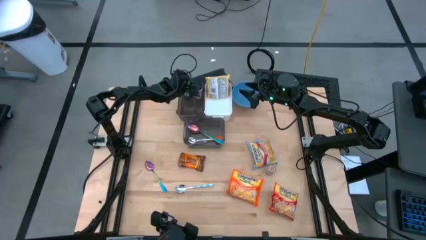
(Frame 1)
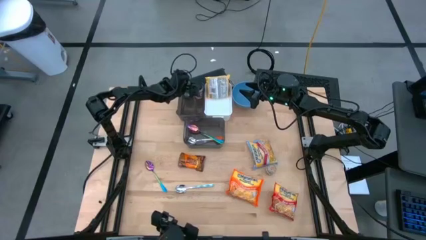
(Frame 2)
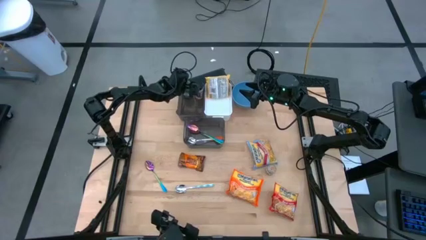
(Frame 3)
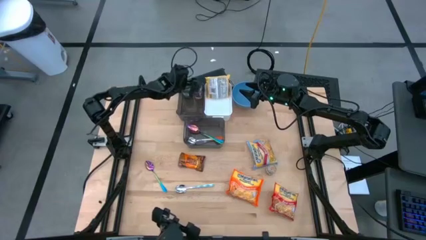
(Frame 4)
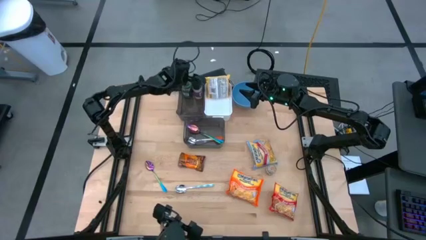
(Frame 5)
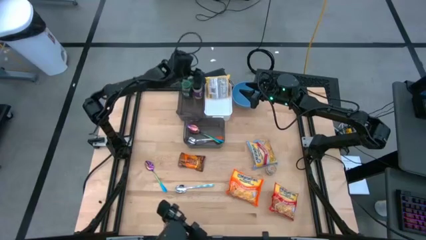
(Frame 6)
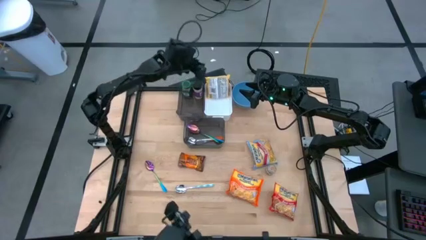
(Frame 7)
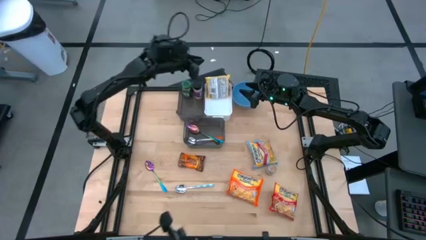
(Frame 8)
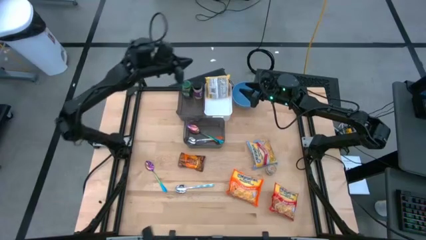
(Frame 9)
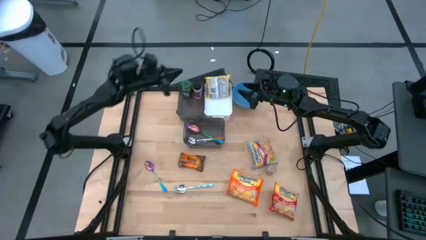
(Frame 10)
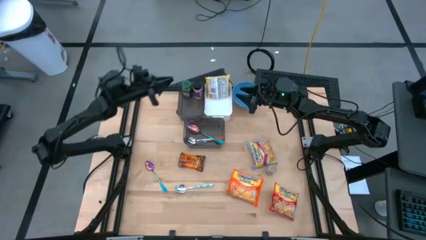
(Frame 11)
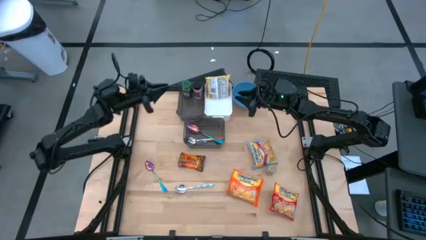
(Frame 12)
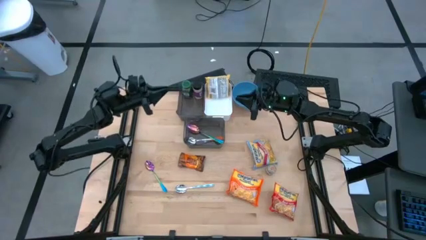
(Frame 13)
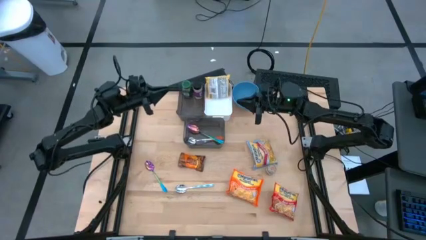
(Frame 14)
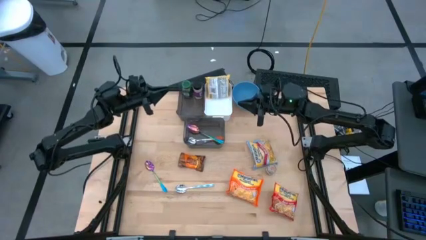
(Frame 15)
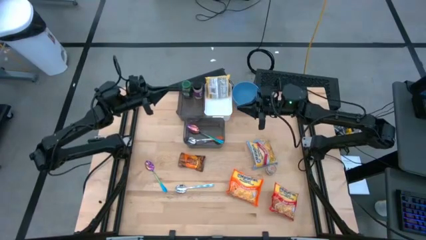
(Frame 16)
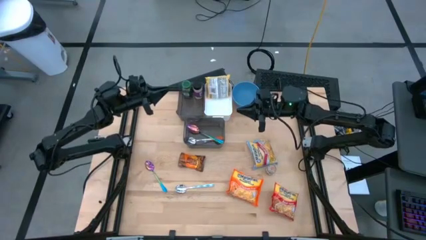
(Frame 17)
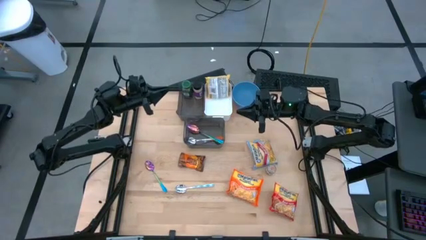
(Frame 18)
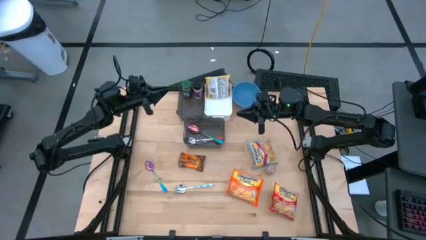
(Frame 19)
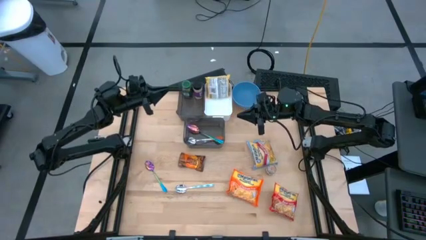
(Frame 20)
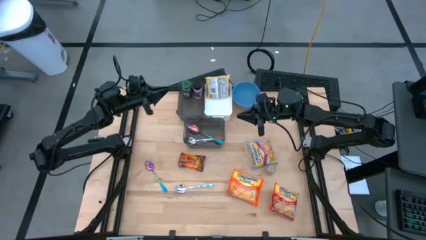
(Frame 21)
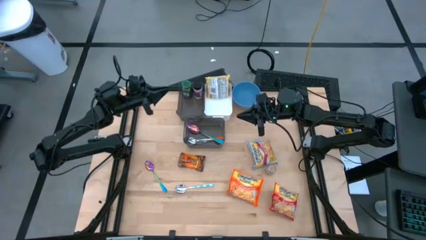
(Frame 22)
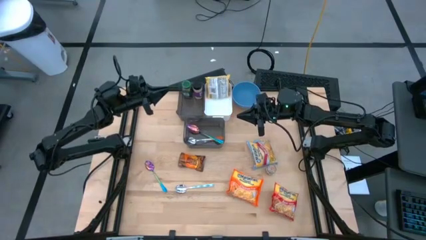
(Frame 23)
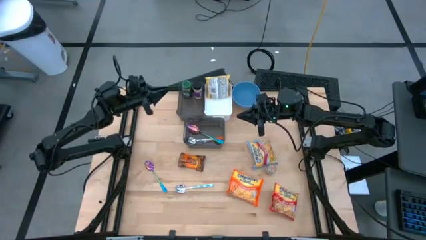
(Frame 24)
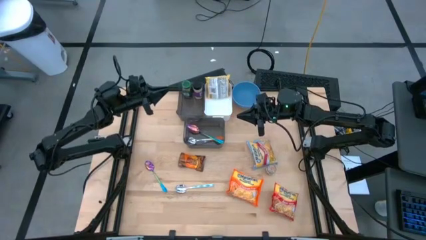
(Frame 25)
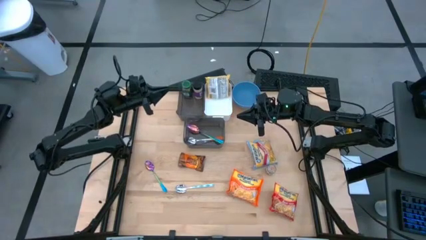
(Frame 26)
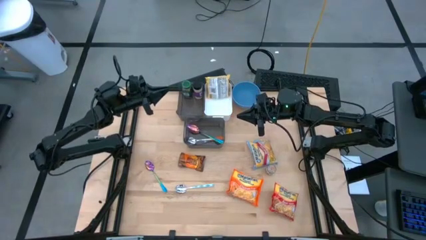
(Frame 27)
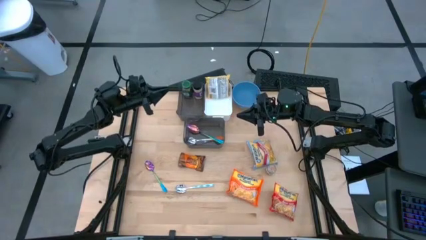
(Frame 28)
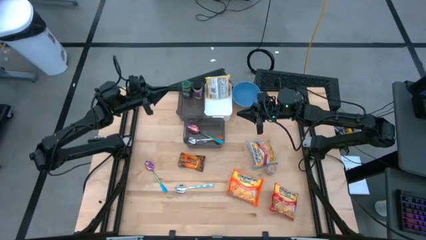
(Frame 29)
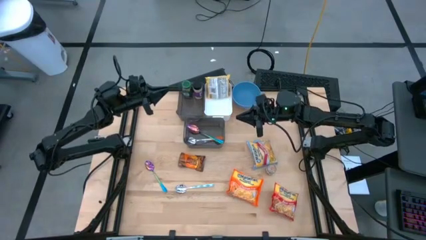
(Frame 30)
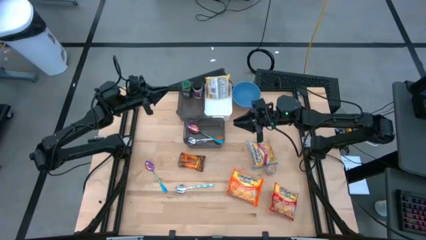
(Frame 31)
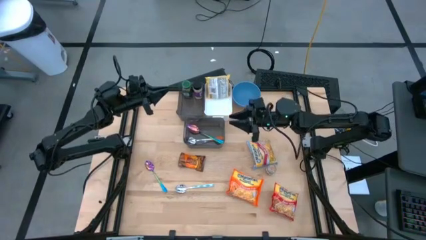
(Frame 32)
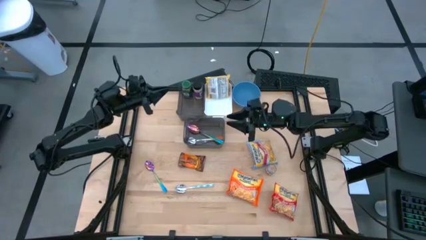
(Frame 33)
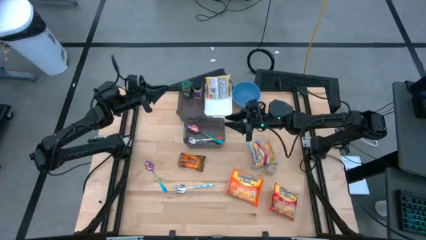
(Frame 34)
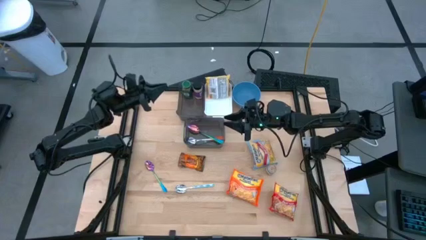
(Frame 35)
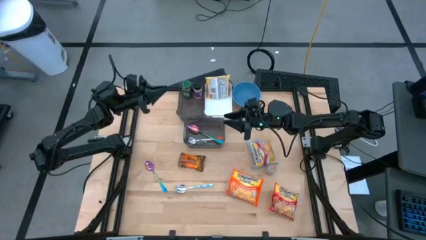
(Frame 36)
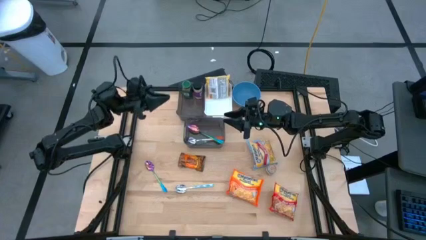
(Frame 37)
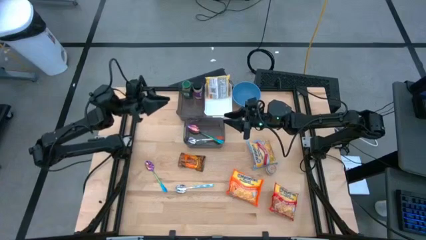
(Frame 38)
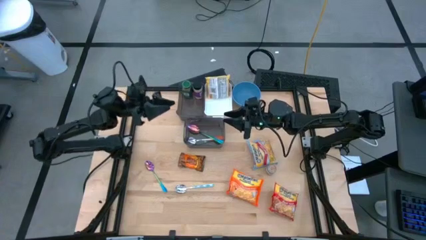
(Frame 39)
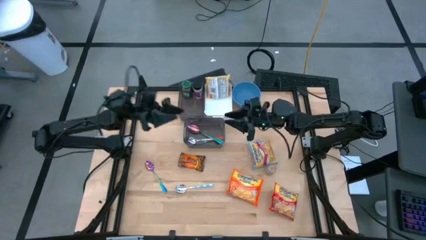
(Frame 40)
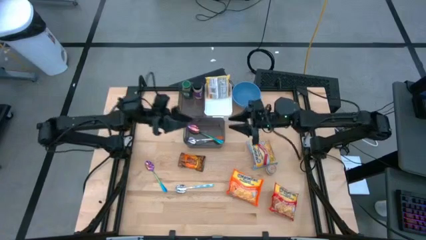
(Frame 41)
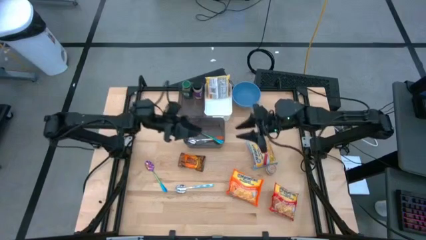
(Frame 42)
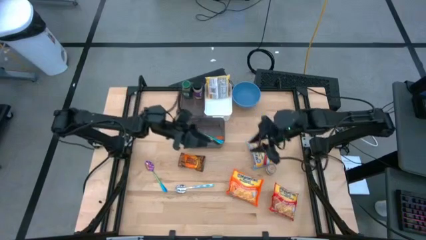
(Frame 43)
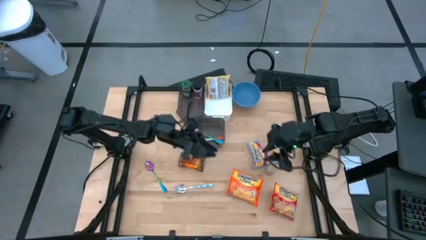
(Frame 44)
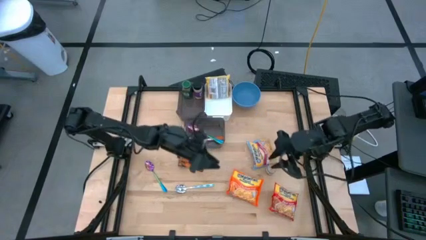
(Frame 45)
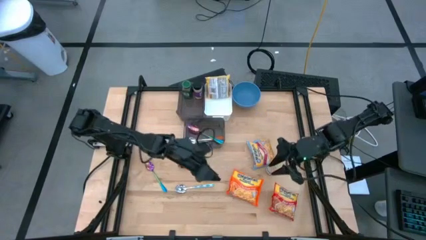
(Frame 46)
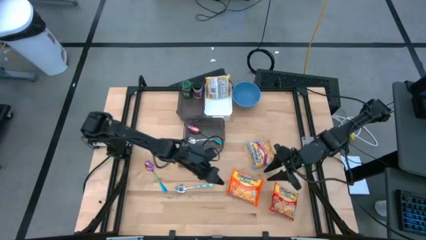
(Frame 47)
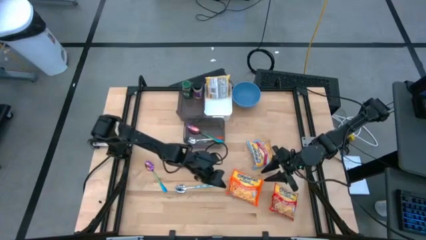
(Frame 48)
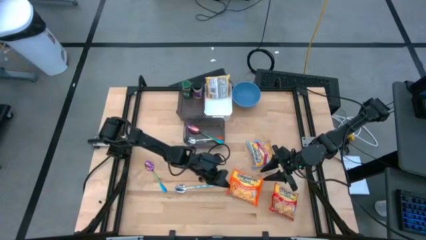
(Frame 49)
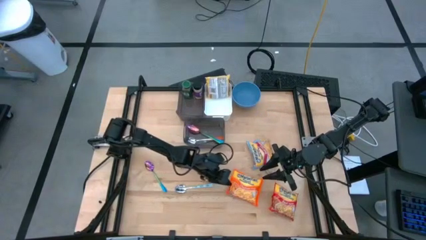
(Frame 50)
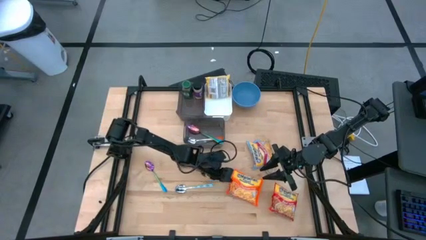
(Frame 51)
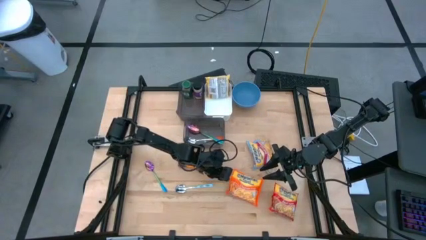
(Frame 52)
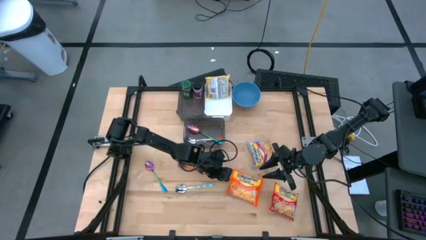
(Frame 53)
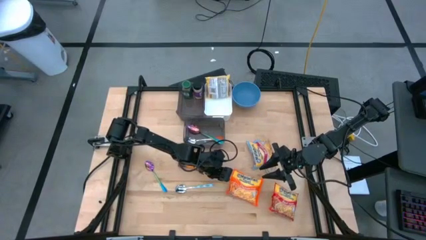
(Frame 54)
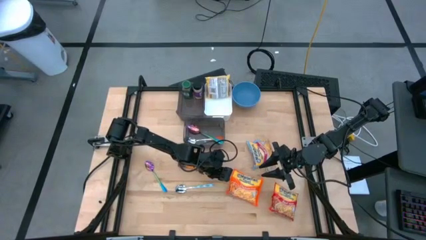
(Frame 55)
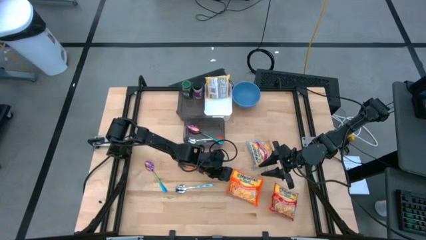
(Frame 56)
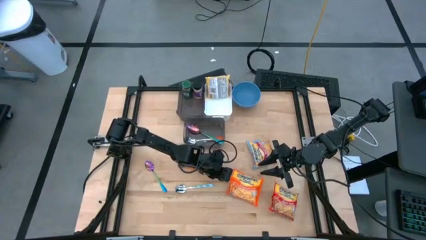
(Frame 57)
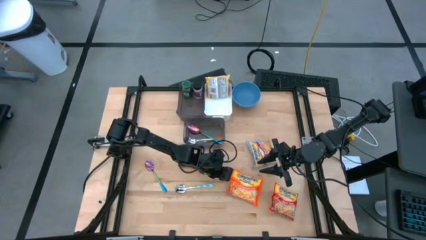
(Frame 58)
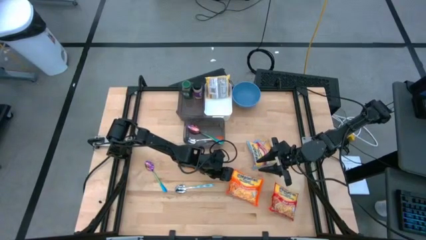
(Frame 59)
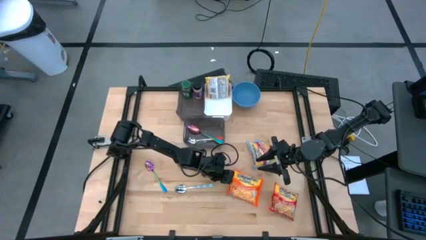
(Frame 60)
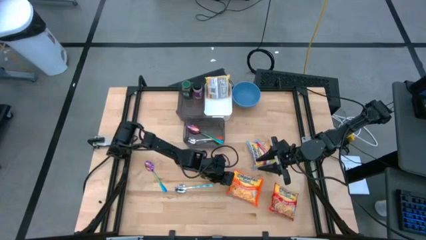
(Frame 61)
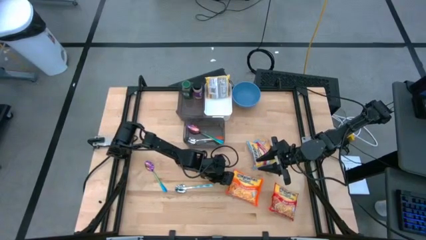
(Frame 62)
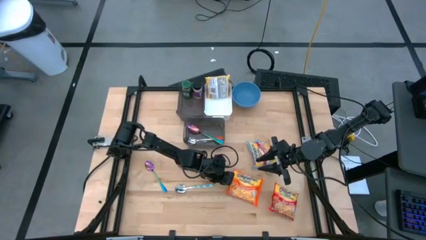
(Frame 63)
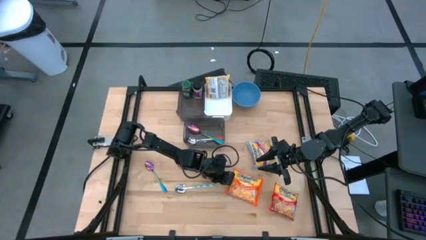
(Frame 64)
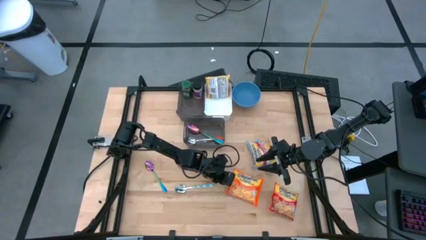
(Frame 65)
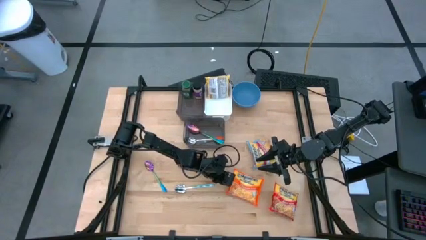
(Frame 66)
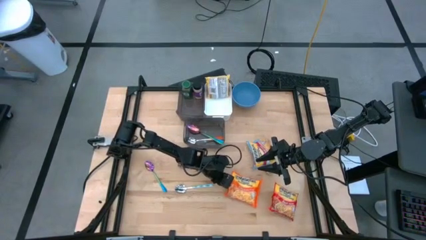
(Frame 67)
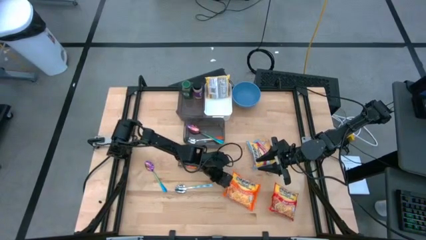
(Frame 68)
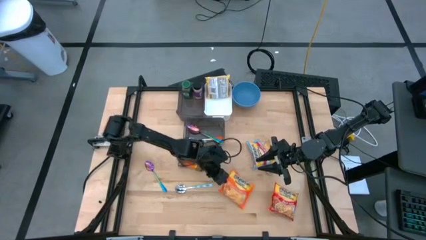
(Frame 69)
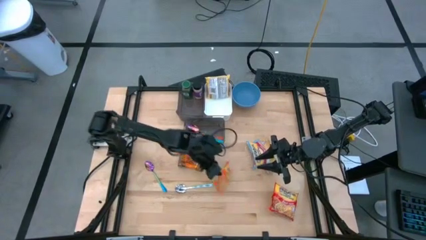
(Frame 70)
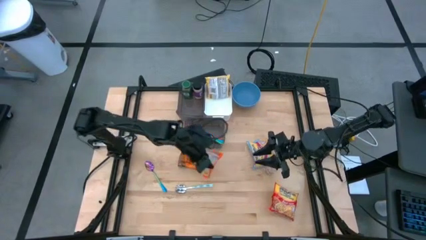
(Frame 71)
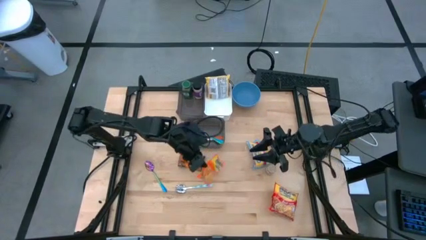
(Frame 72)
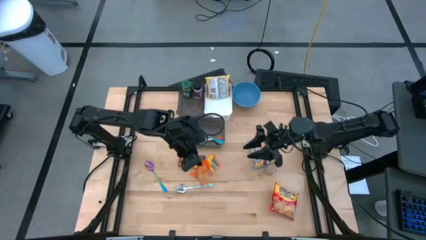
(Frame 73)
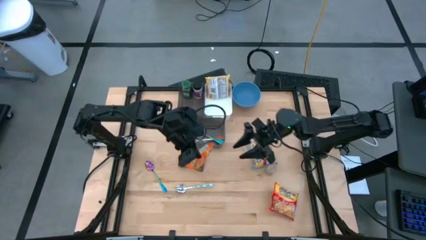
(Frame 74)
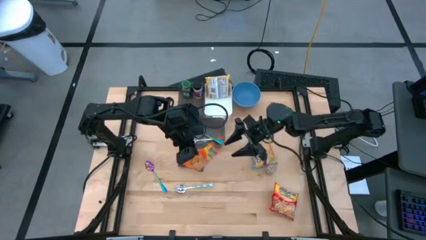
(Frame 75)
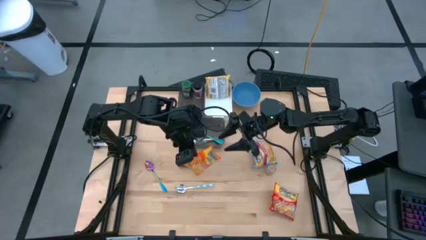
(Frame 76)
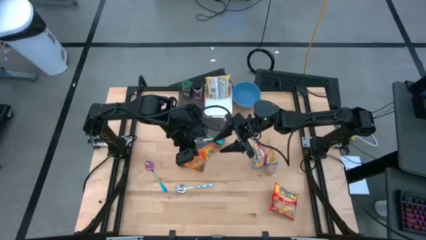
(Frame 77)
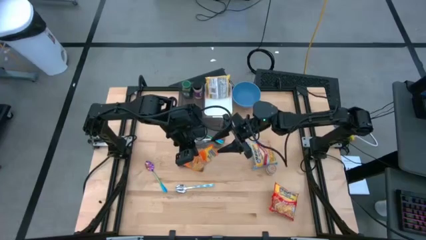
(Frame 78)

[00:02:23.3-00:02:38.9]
Task: Pick & Place Food Item
Put the orange noodle pack into the white bin
